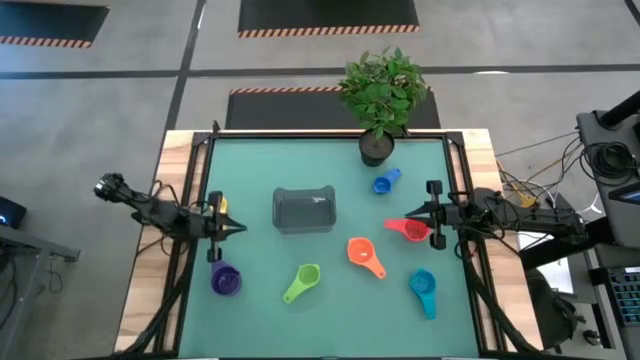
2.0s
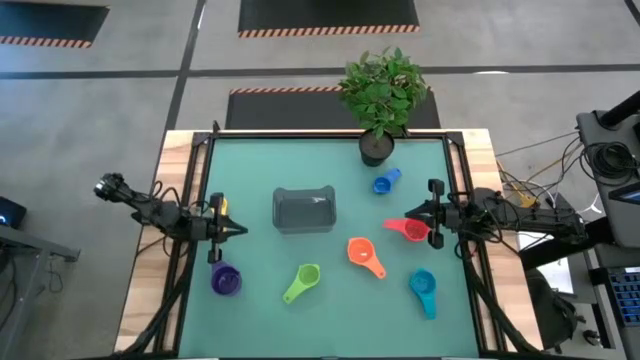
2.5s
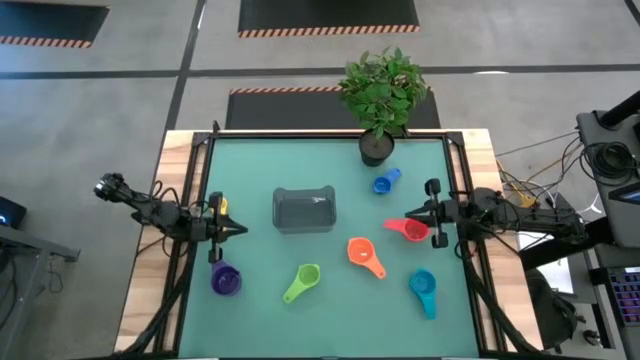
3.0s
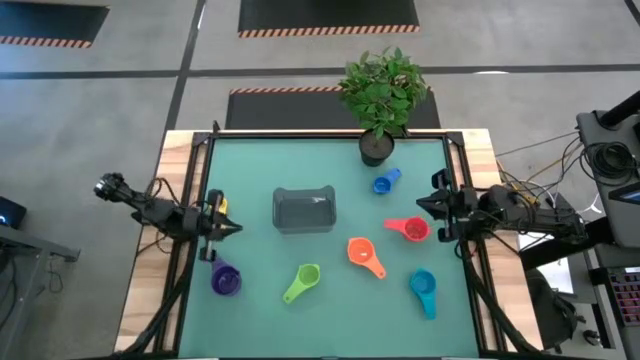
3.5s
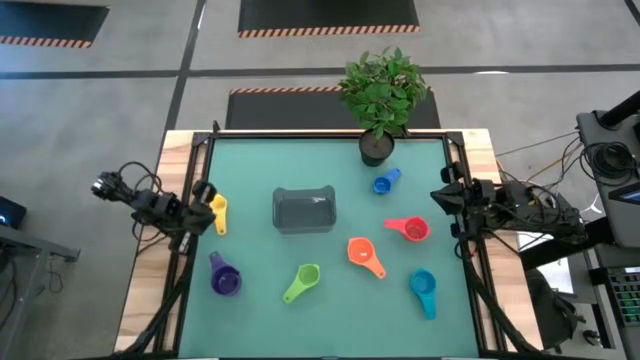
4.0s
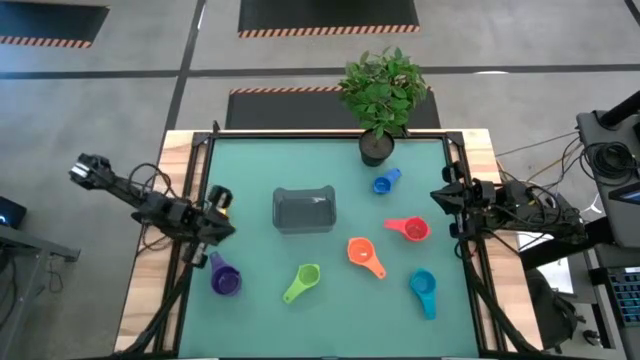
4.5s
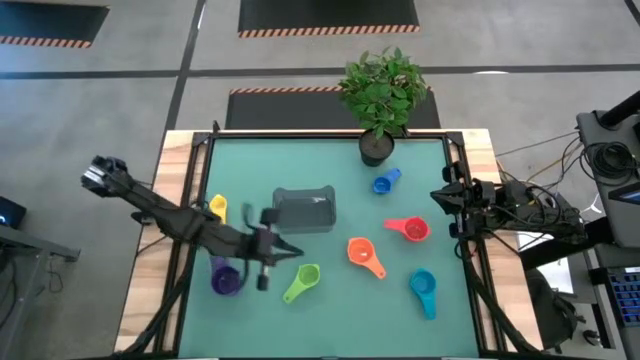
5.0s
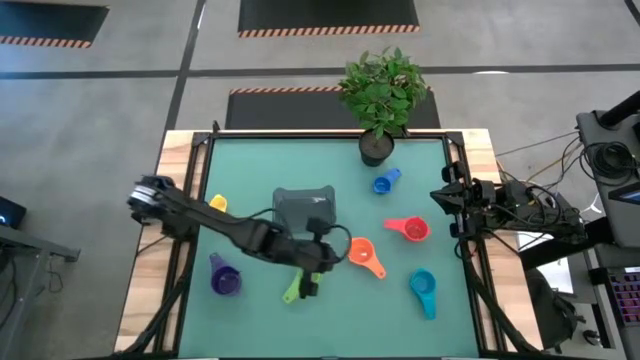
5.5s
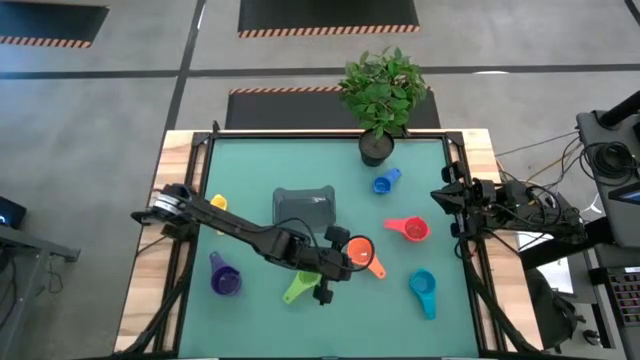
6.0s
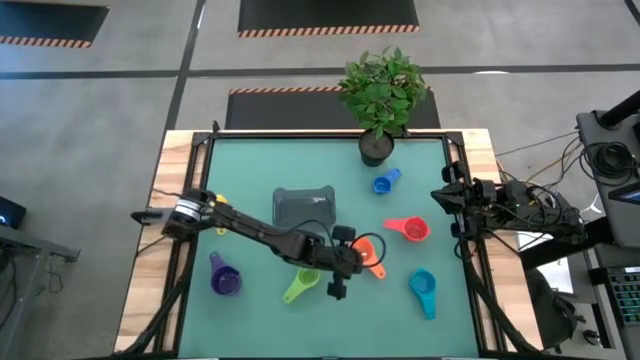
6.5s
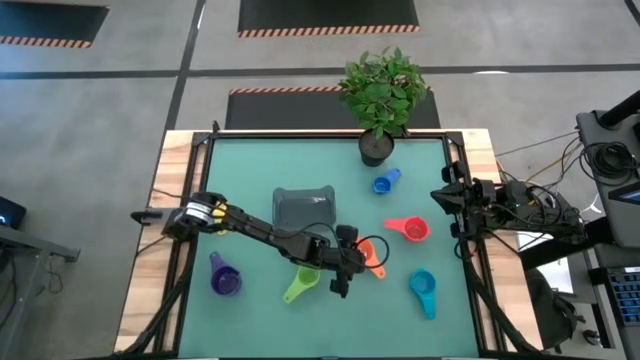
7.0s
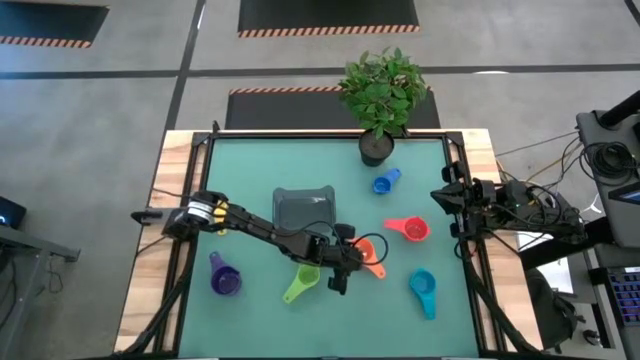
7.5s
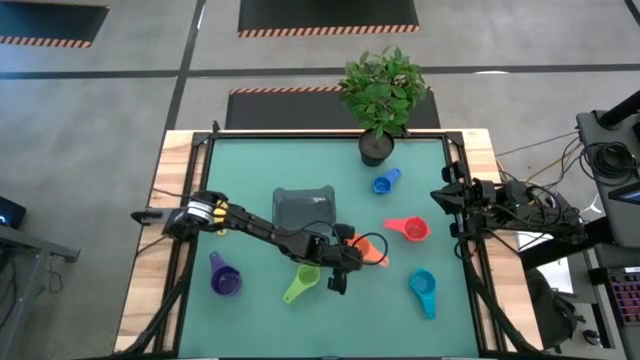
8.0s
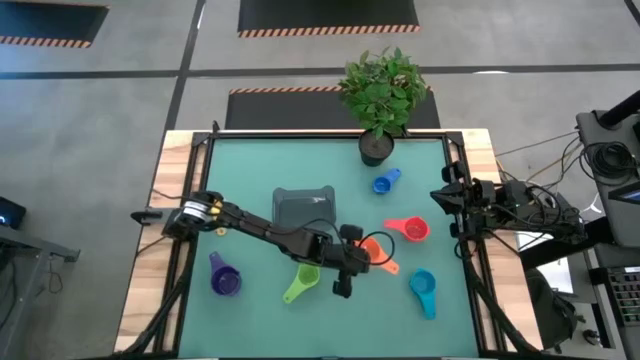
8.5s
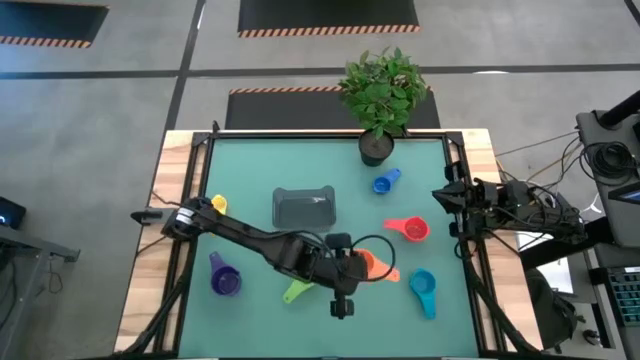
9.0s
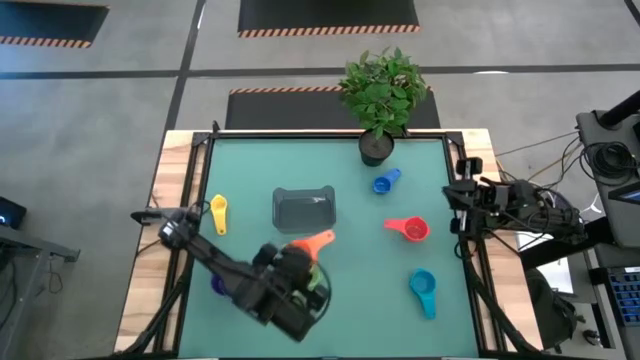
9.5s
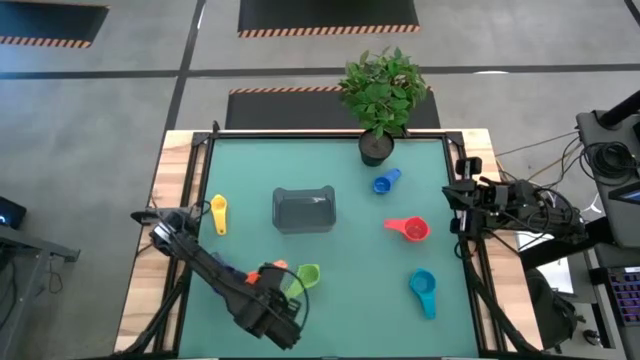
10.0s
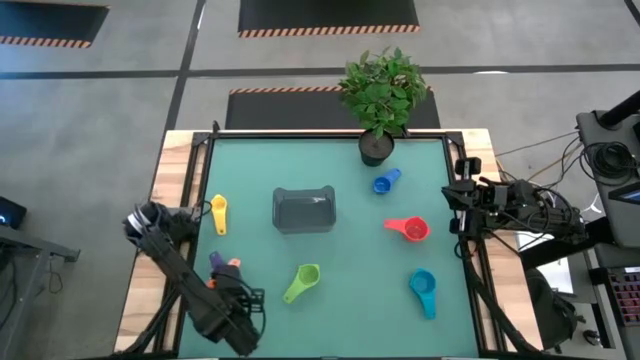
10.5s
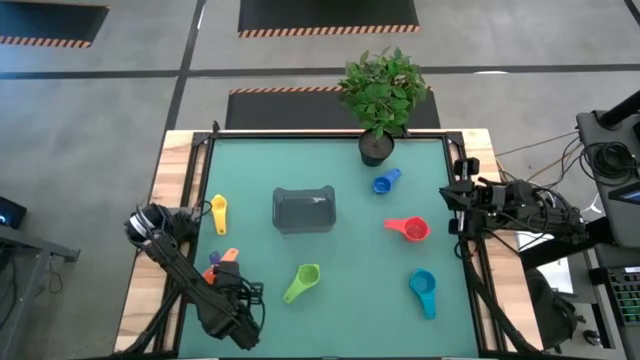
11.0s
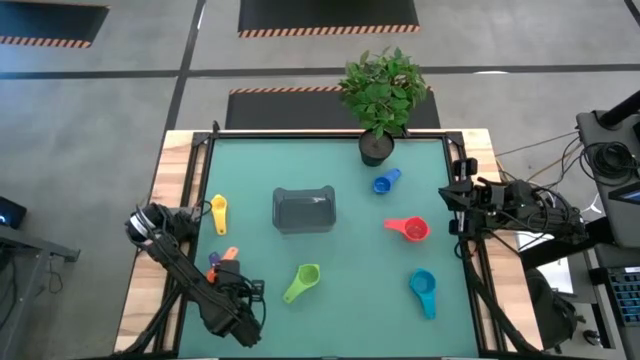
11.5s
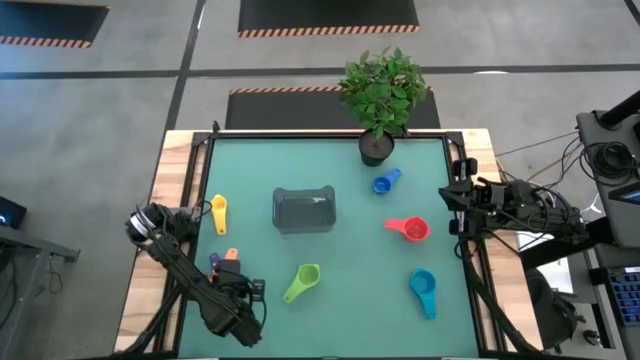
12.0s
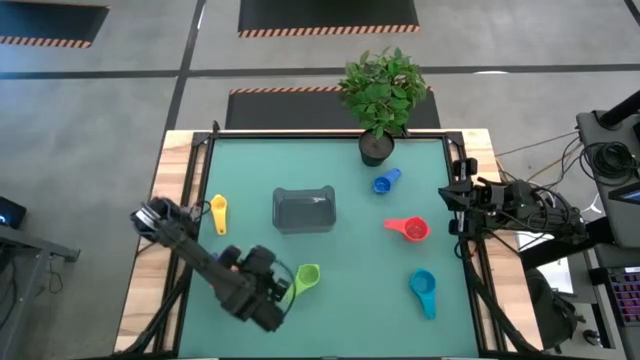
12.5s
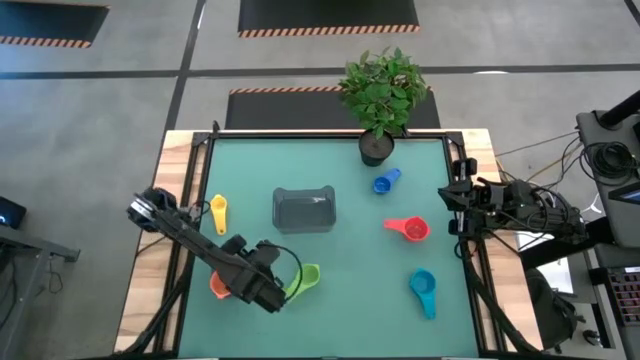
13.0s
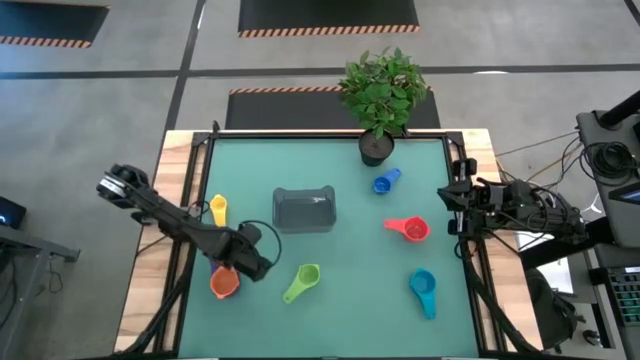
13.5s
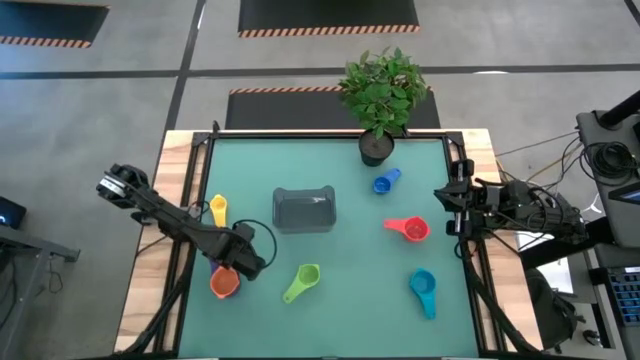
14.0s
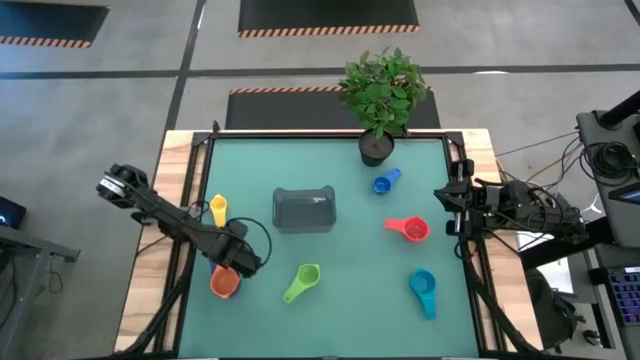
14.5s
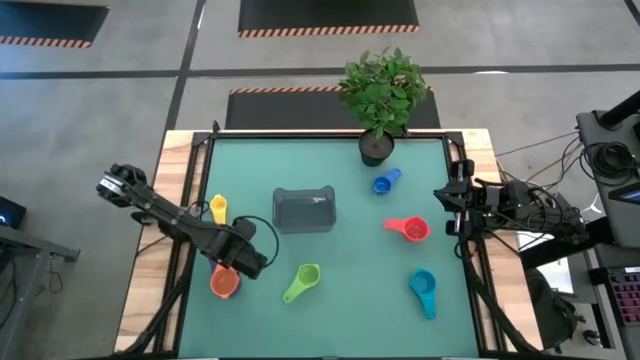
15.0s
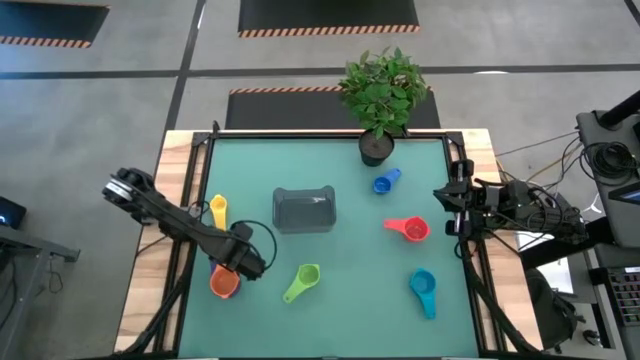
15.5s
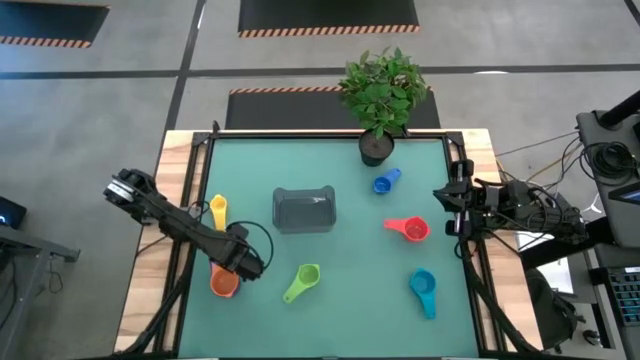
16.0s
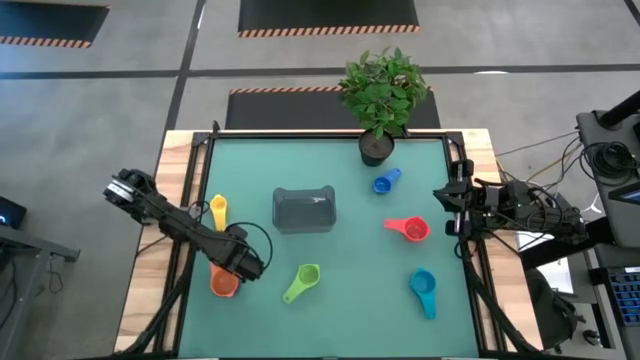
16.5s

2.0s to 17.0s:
Task: Nest measuring cups in basket
Stack the orange measuring cup on top of the violet measuring cup
